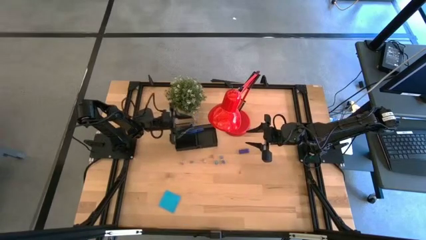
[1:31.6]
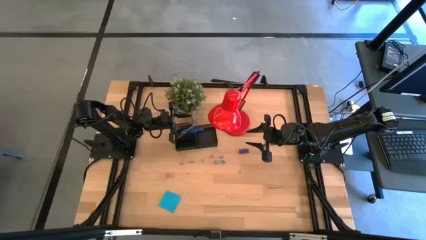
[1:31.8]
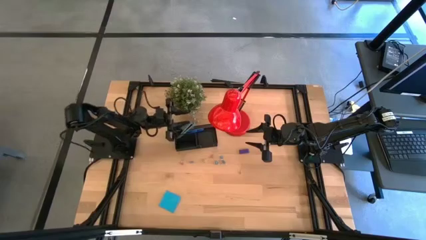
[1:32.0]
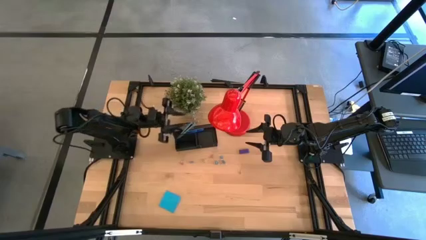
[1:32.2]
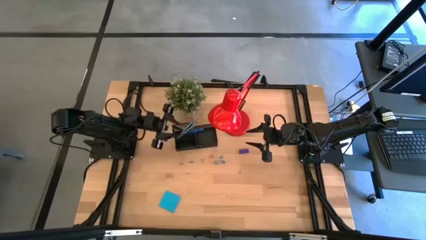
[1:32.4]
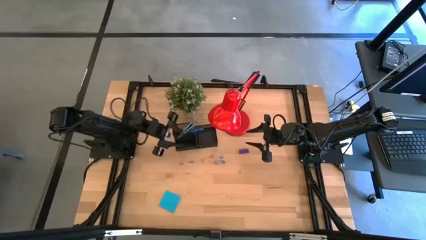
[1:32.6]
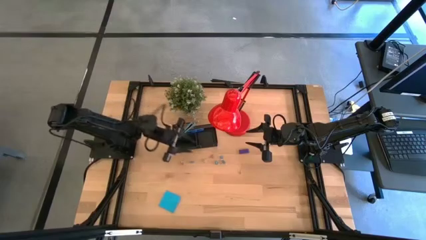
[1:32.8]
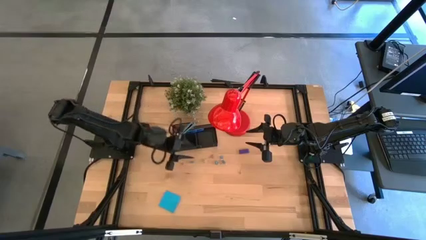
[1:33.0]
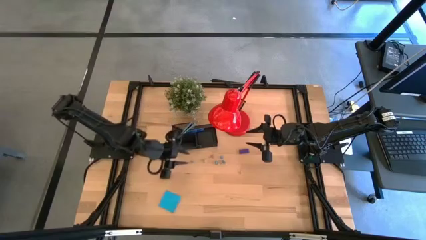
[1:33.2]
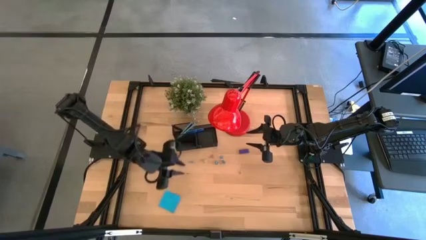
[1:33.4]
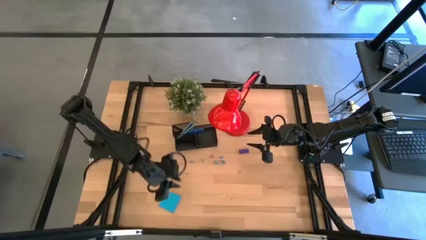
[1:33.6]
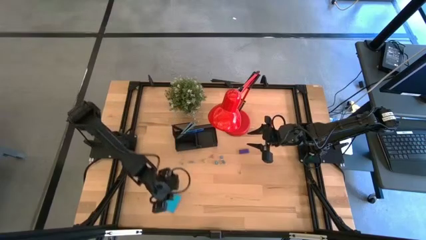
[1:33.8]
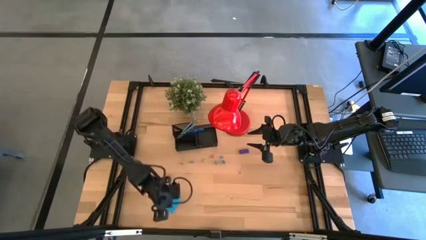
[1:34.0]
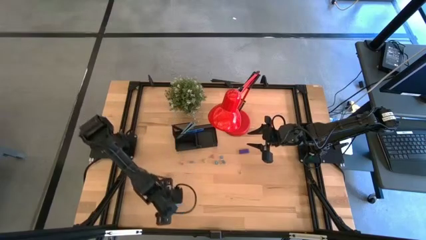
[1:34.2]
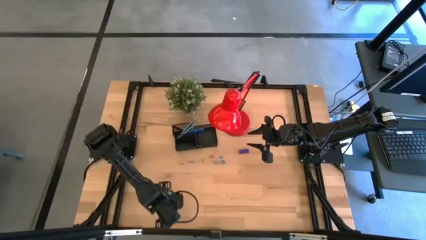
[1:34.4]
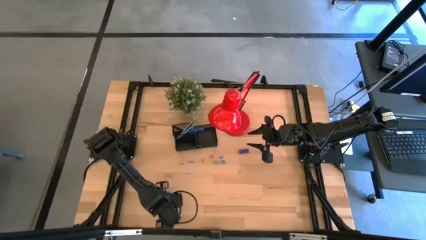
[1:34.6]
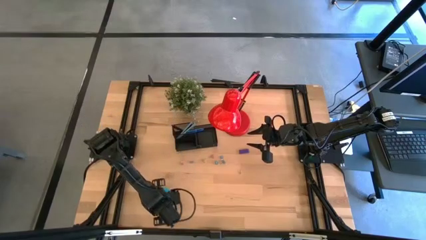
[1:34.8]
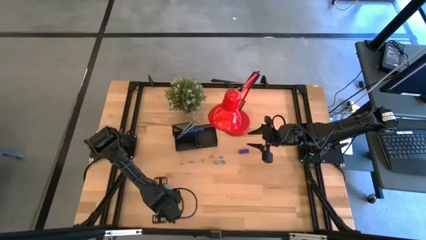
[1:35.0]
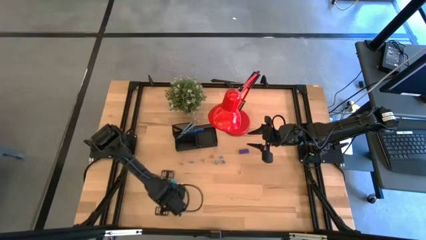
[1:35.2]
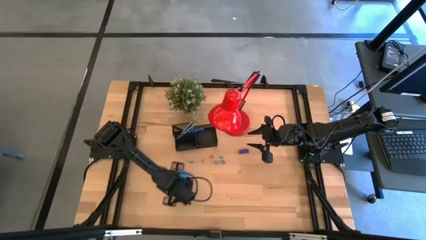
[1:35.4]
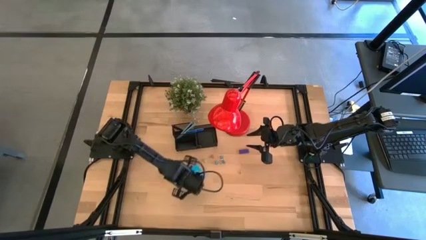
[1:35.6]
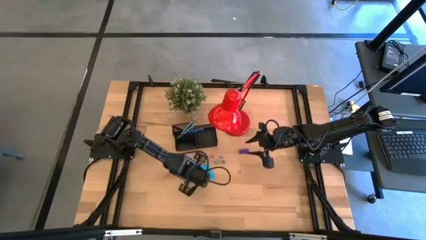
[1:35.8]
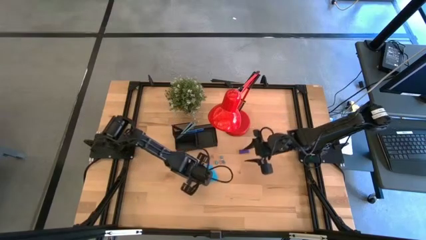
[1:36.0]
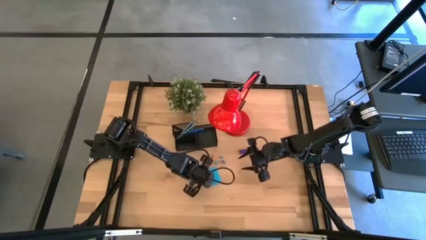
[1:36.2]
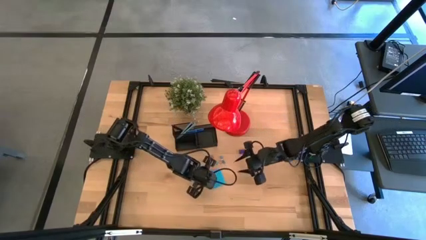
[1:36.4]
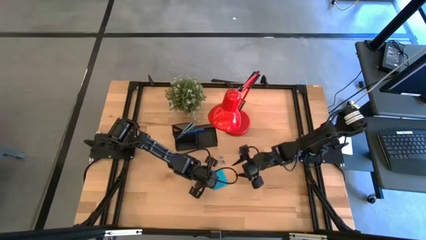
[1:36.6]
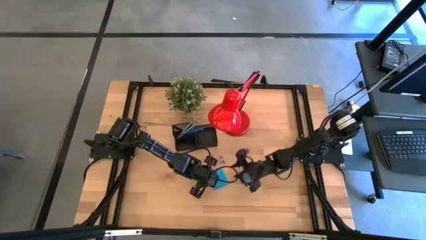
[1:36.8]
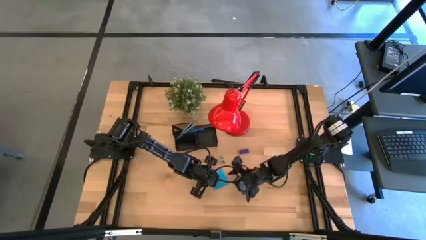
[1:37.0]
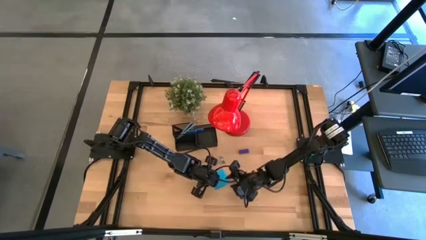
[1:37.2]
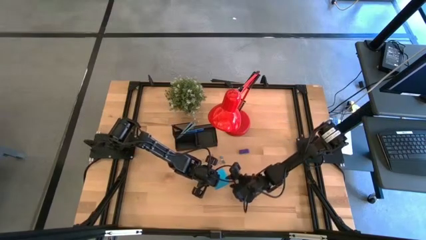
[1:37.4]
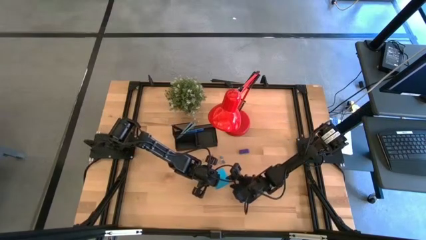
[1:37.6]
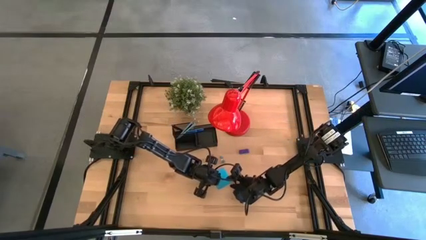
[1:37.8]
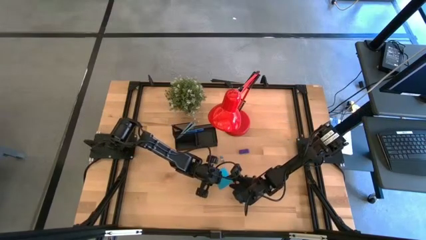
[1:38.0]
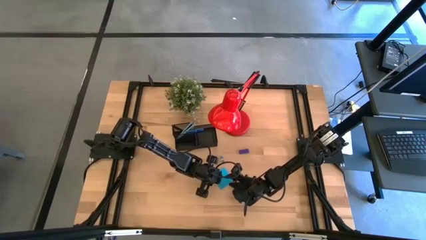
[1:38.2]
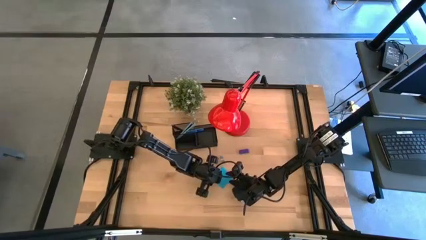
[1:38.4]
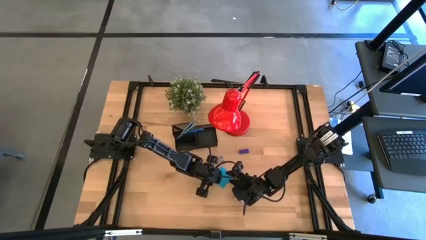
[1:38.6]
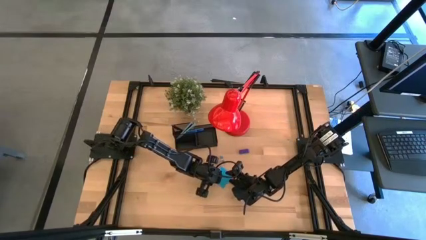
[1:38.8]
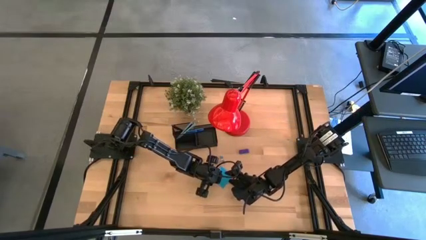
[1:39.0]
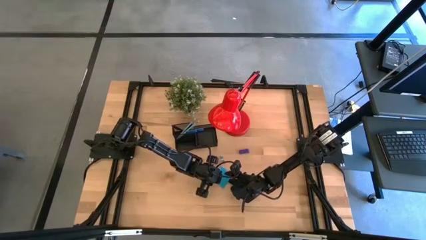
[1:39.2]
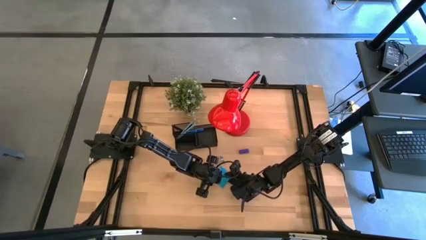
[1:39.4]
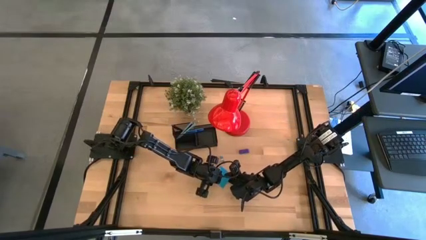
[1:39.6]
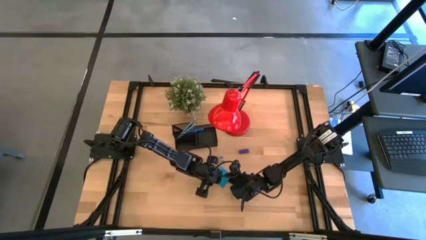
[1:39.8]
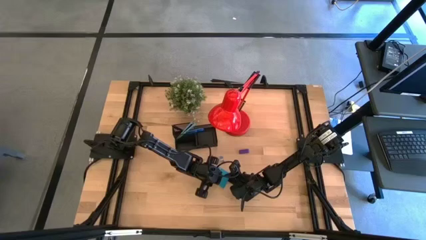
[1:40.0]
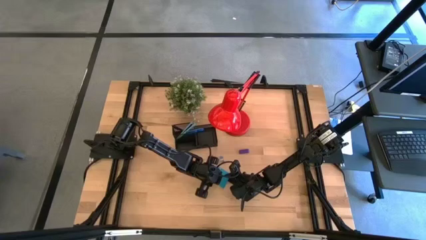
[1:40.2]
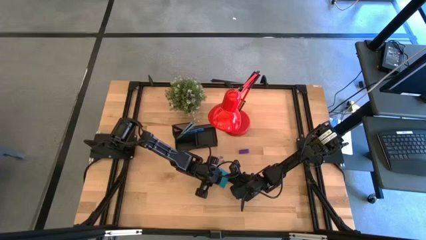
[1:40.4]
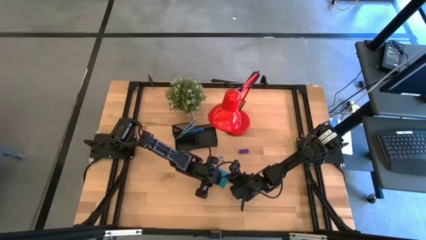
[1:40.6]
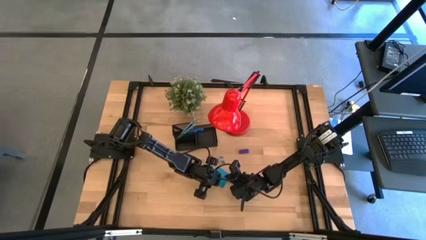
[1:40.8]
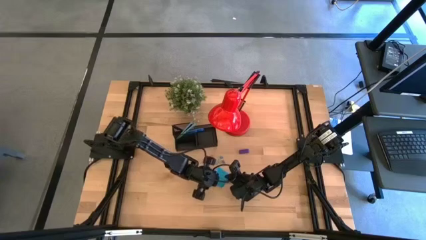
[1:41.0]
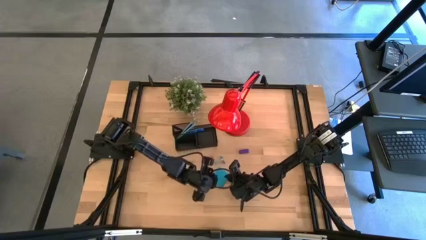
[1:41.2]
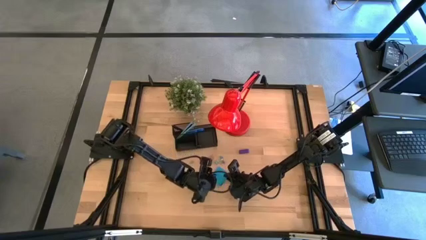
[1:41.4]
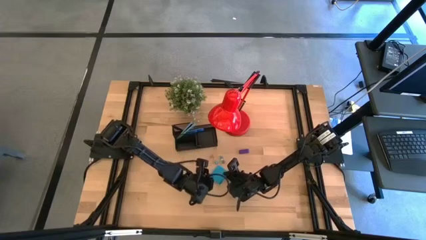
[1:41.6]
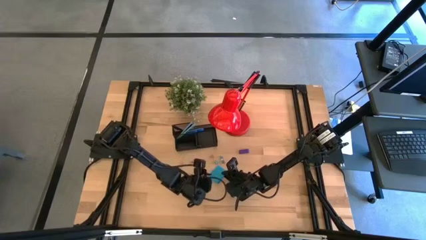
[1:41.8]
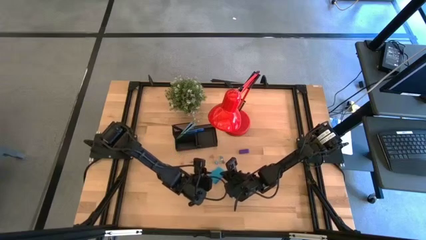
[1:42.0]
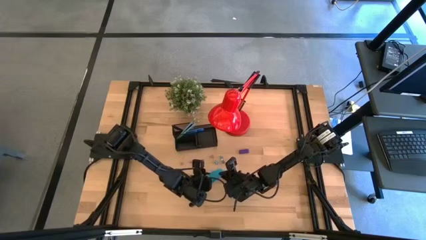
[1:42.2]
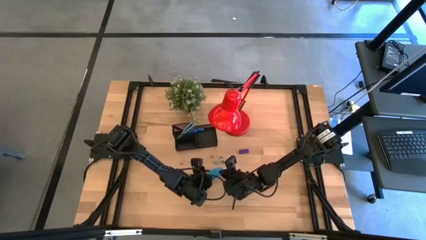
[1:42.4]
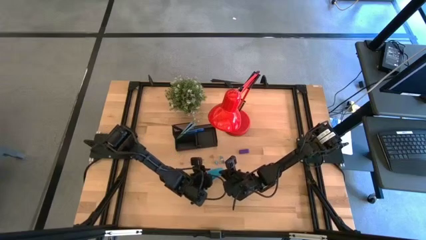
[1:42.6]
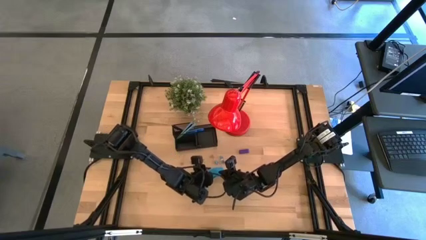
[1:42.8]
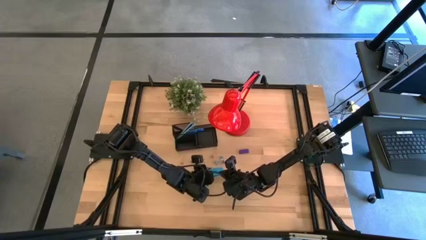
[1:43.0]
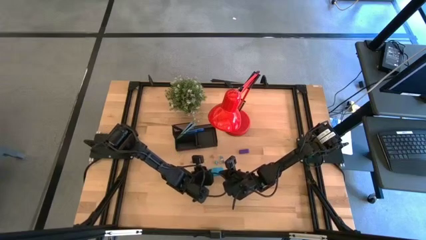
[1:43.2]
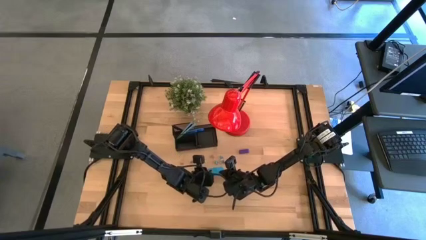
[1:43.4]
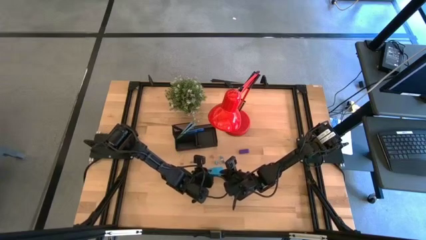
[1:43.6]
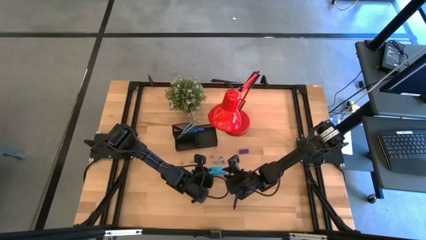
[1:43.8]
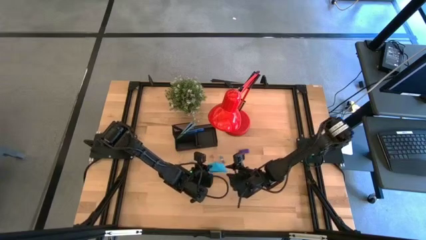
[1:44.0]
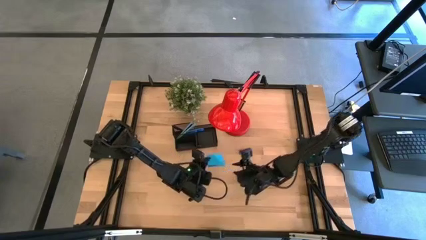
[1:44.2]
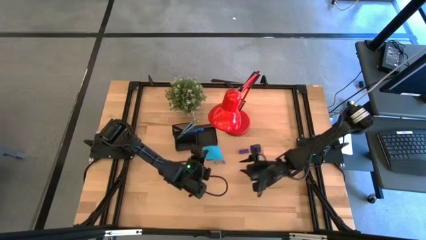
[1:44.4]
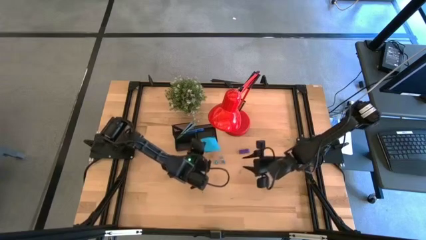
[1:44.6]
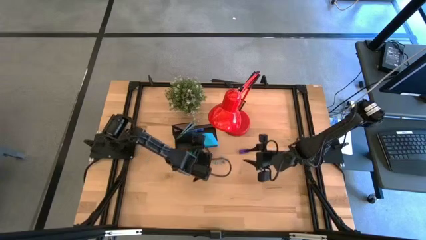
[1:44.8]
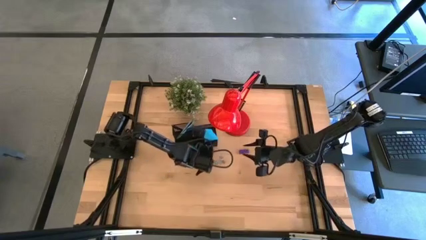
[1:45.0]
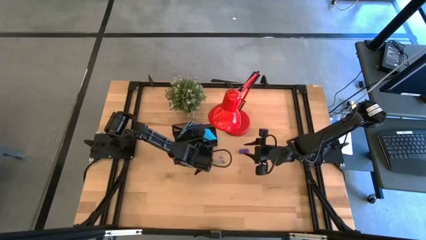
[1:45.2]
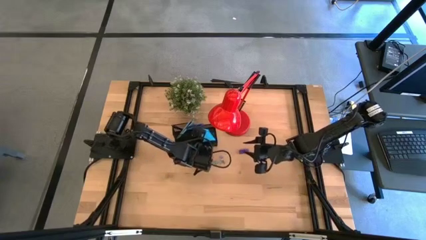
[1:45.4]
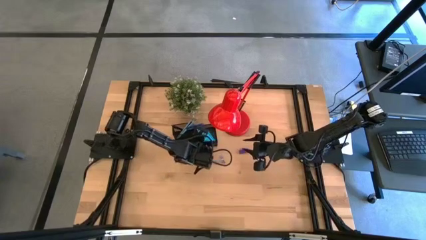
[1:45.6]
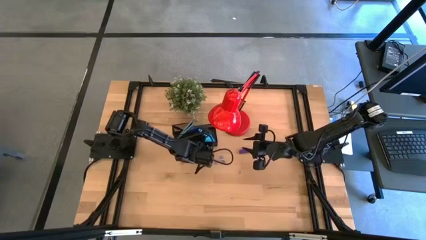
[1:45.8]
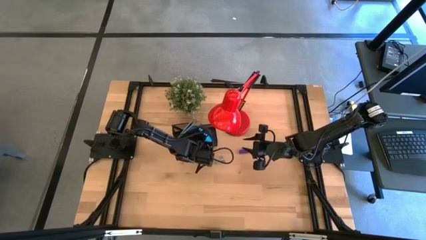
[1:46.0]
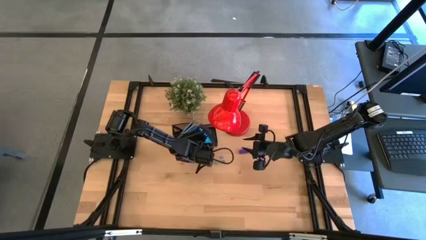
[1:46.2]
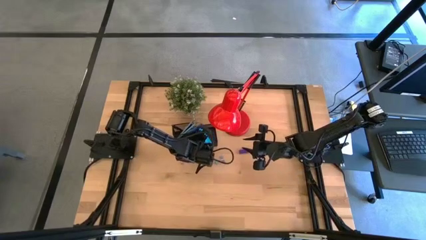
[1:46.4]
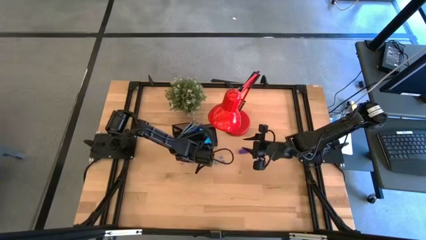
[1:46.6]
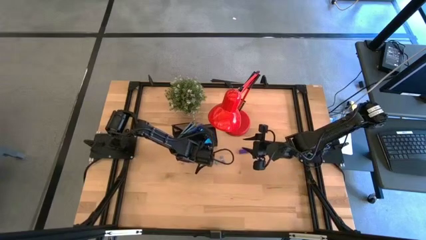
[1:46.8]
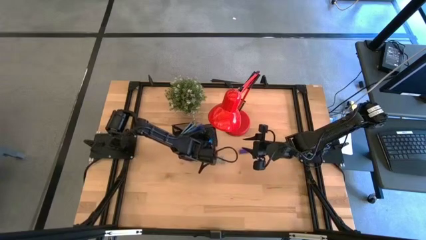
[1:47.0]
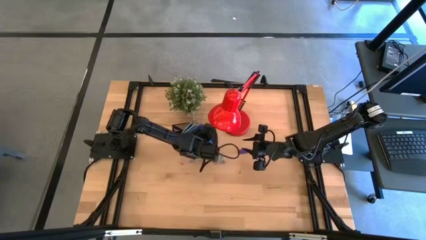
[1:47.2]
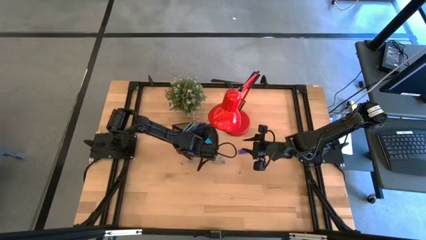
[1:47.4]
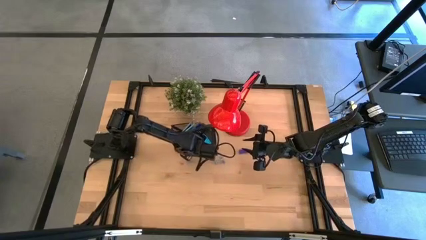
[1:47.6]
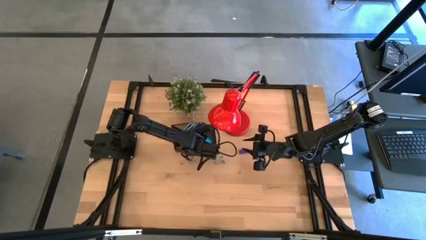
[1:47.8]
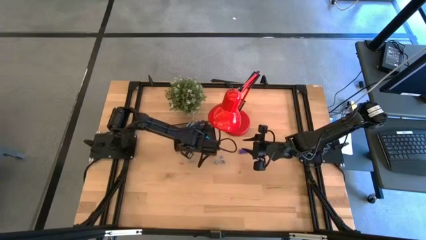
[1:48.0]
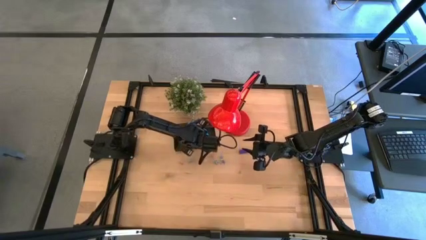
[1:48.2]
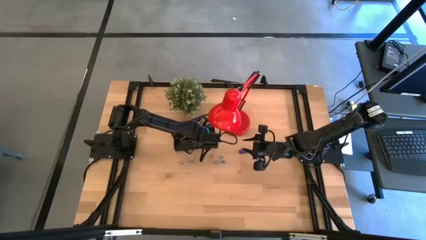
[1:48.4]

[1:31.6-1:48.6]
Task: Pick and place office supplies into organizer
Put the blue sticky notes into the black desk organizer
